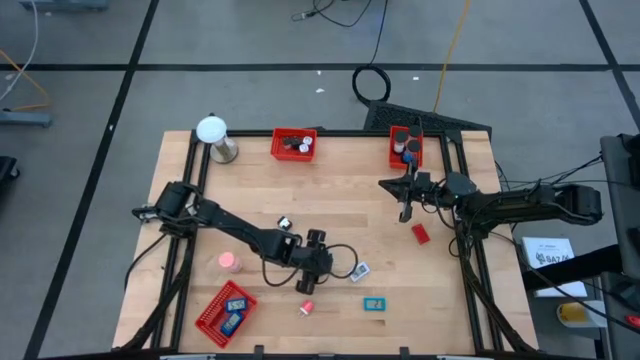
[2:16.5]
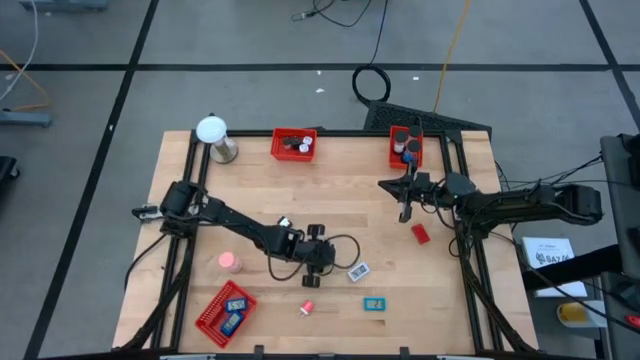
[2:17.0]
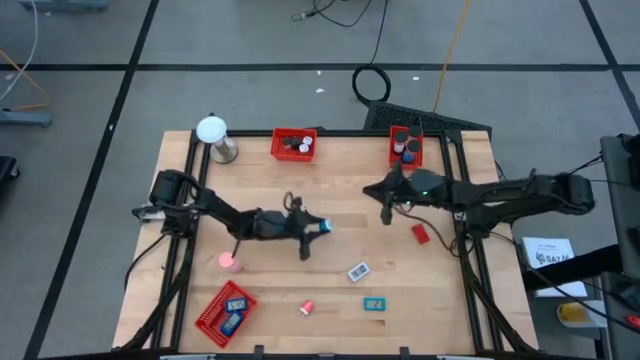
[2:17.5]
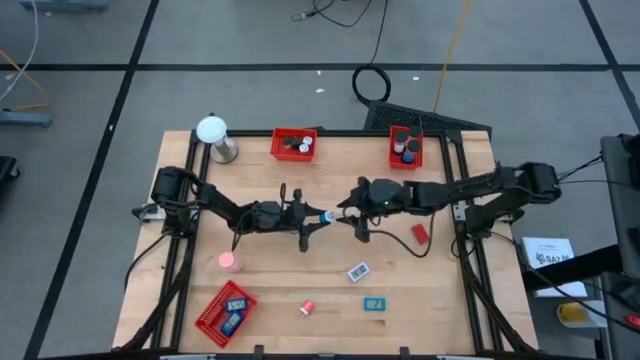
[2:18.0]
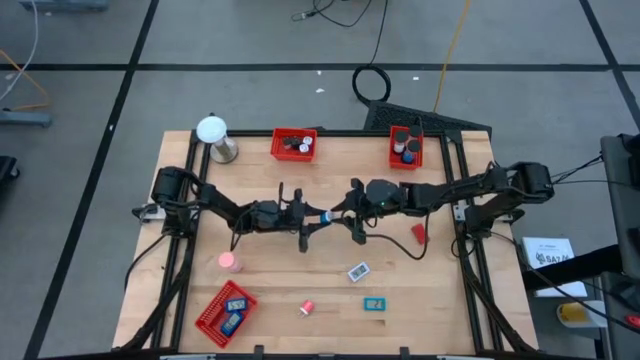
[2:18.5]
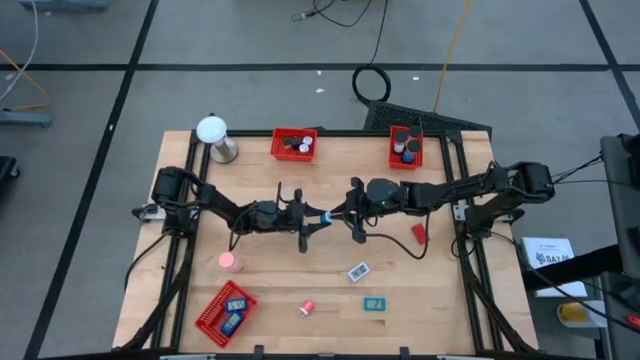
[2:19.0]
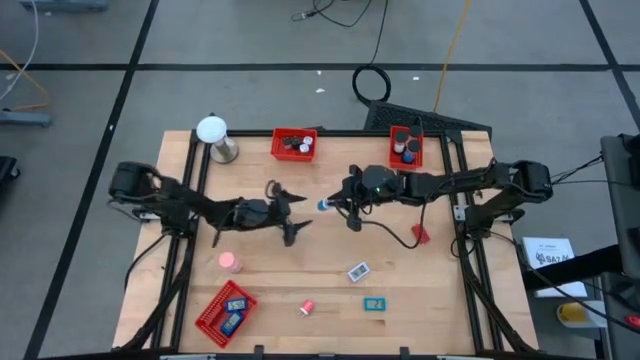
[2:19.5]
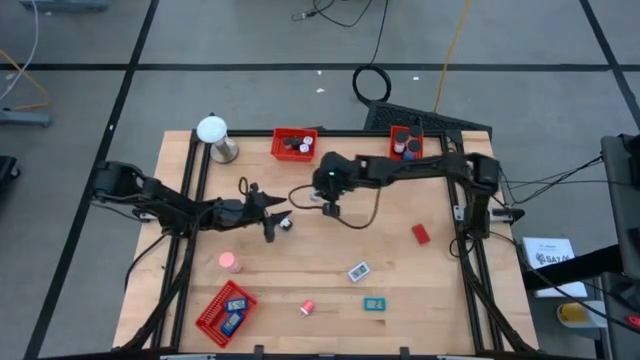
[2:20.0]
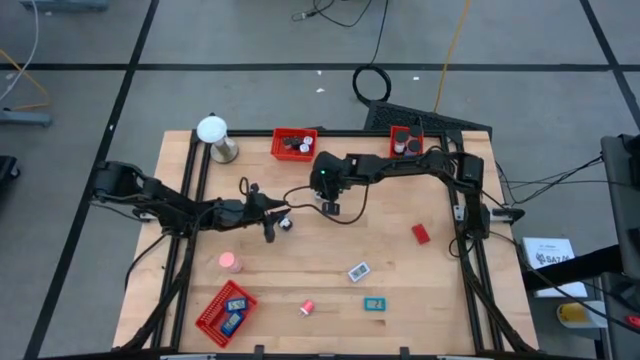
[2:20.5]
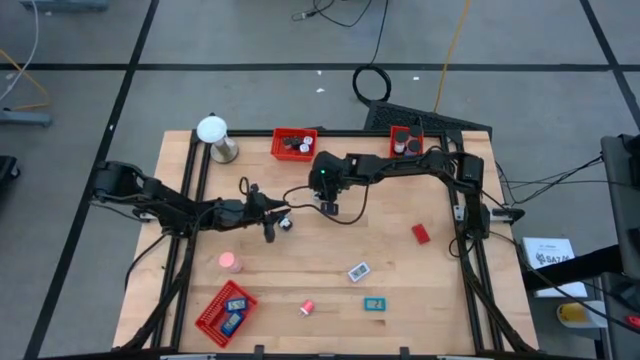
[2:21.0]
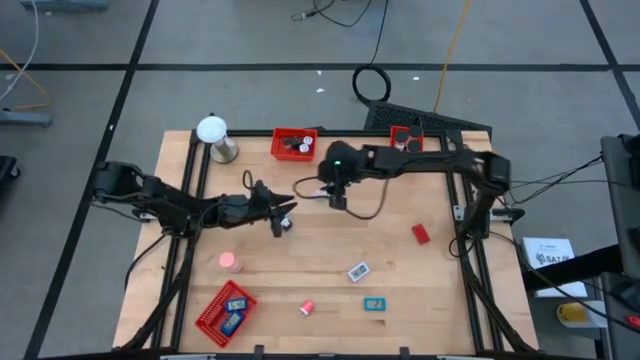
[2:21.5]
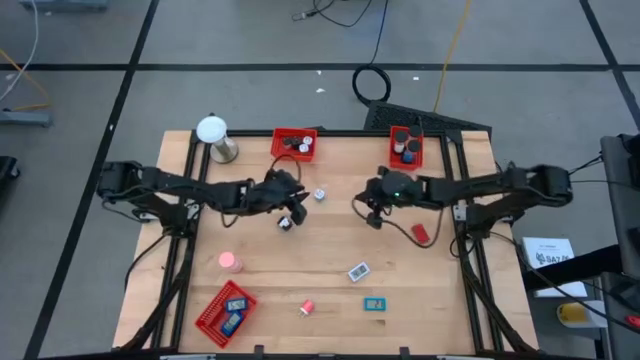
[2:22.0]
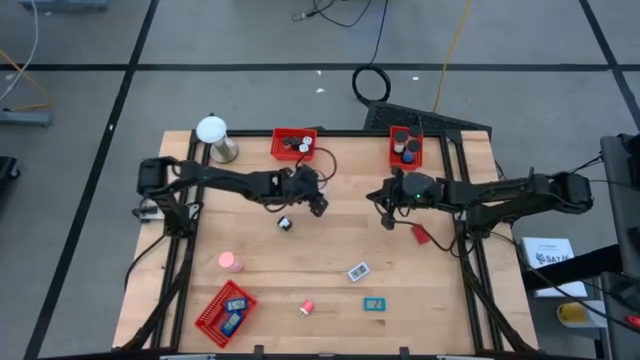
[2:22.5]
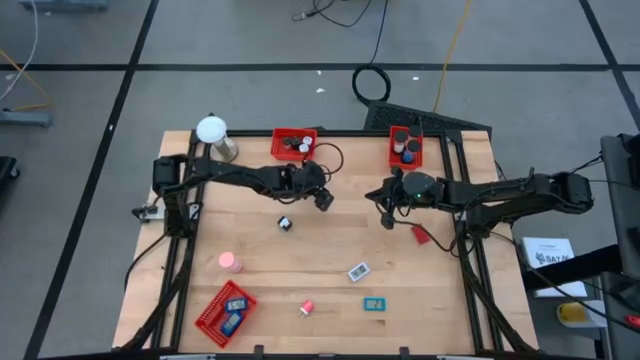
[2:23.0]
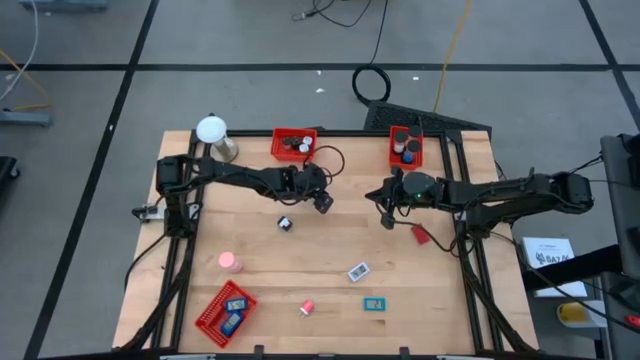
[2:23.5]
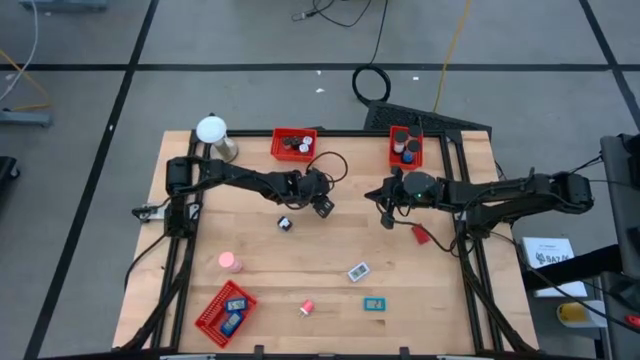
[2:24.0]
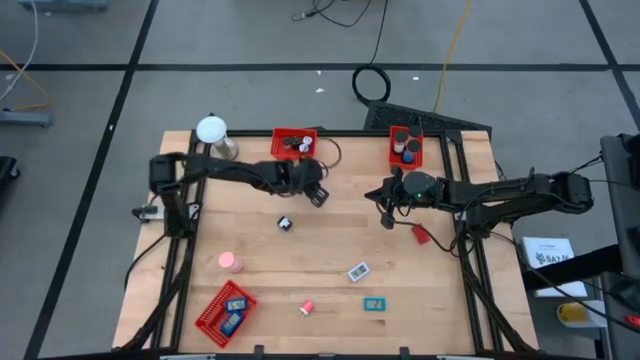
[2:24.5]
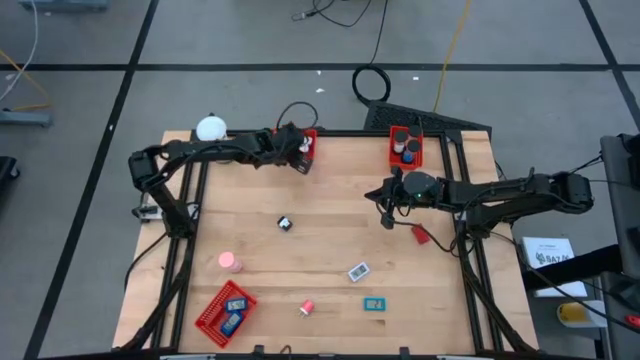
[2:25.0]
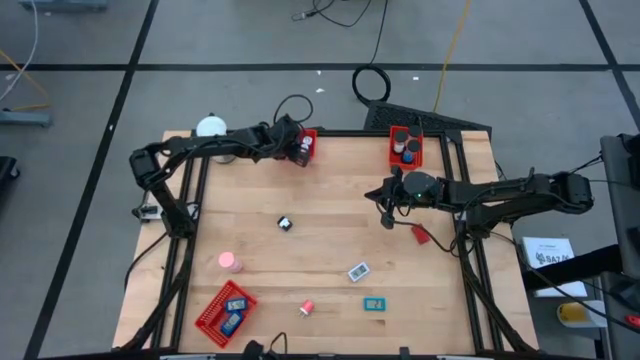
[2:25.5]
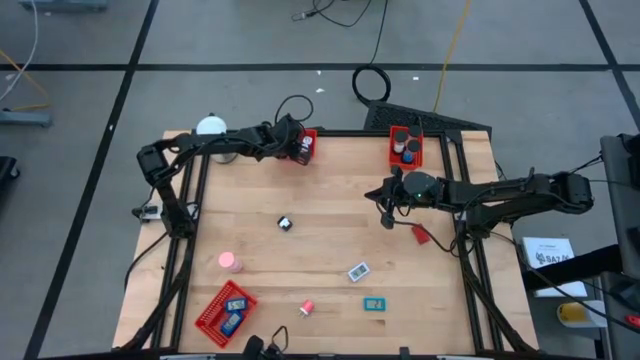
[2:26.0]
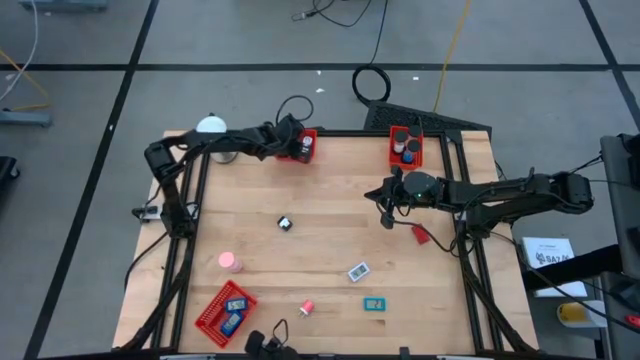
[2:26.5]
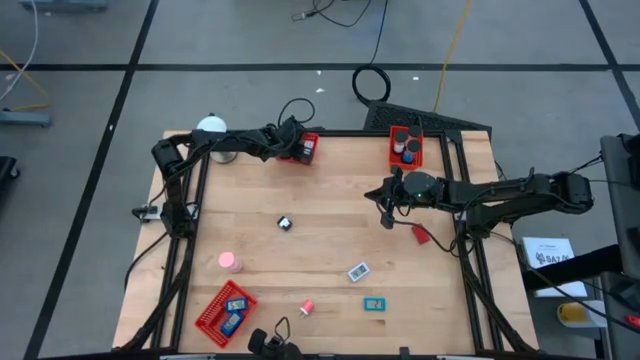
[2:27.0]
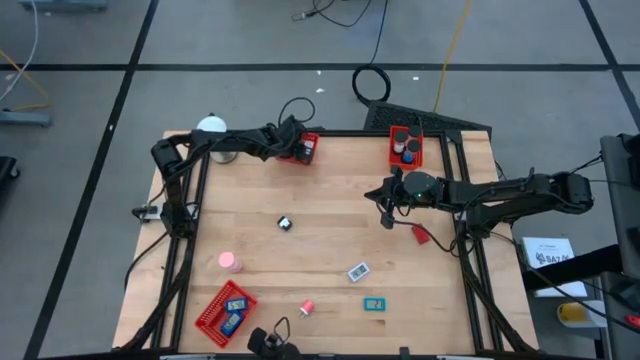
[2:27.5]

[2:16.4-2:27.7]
Task: Pick & Place Office items
Put the blue charger adapter into the top left red basket

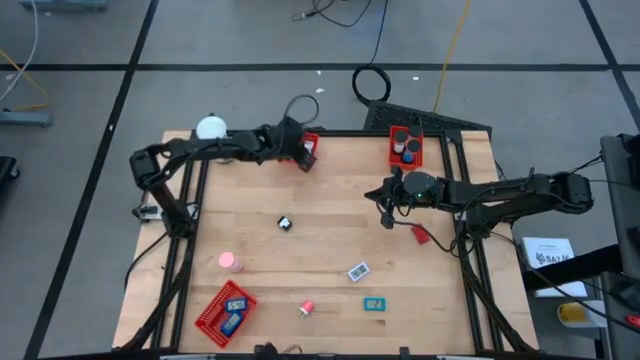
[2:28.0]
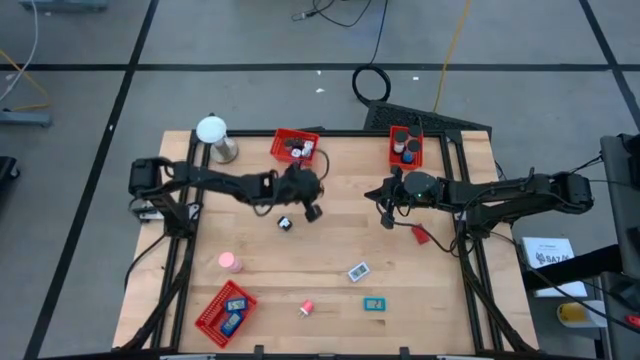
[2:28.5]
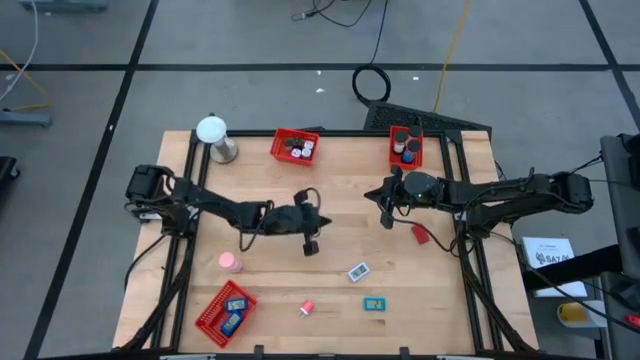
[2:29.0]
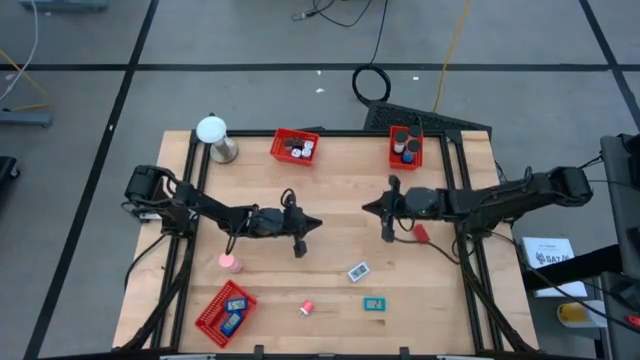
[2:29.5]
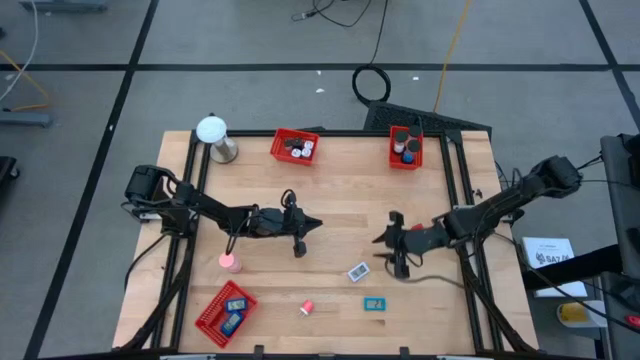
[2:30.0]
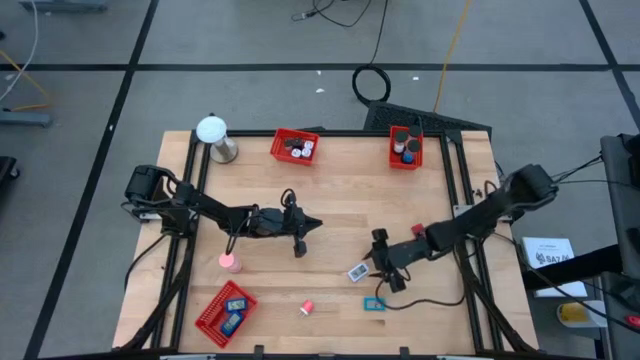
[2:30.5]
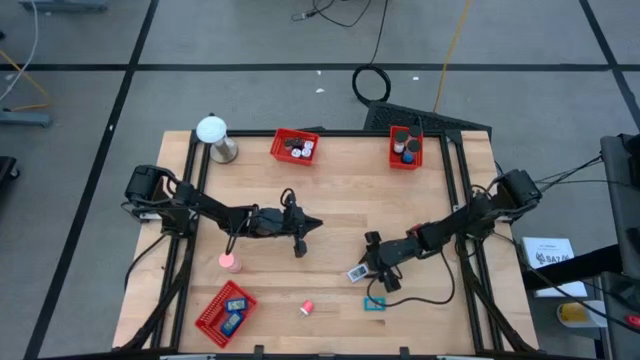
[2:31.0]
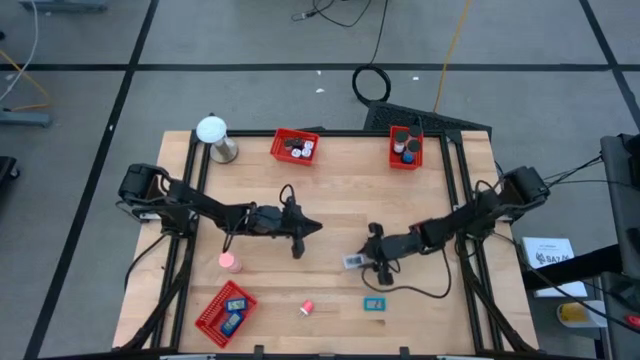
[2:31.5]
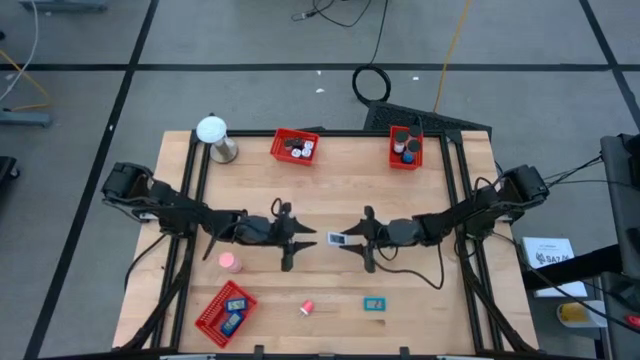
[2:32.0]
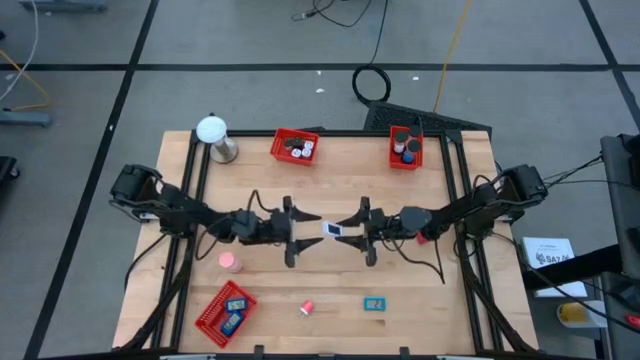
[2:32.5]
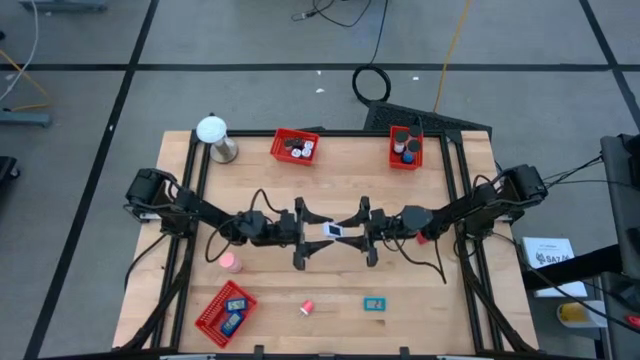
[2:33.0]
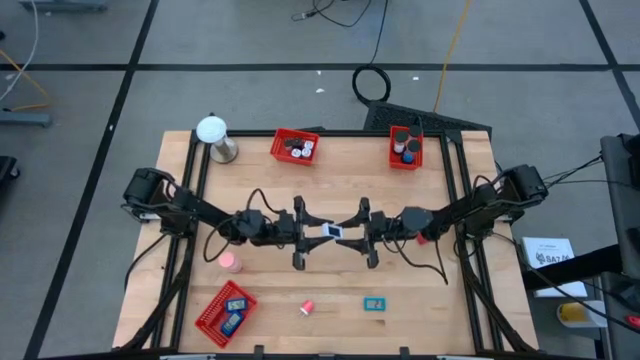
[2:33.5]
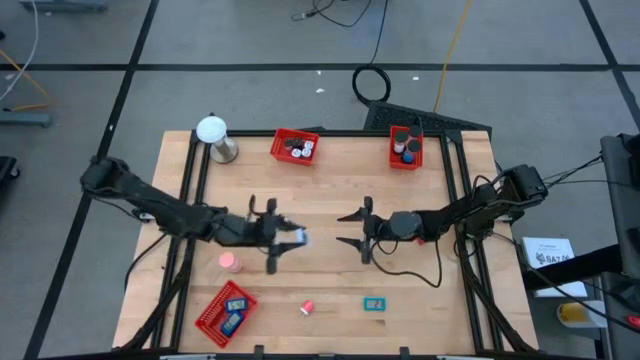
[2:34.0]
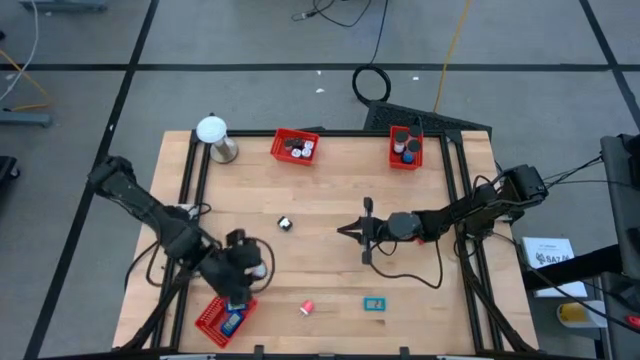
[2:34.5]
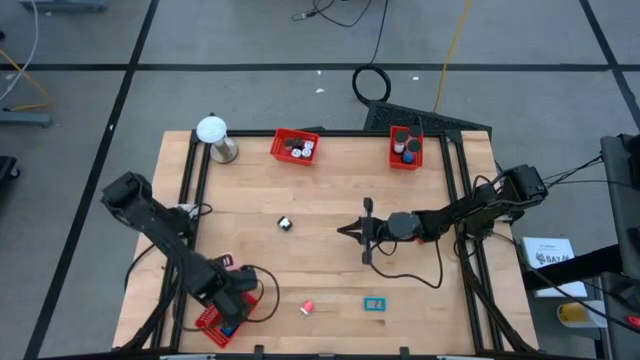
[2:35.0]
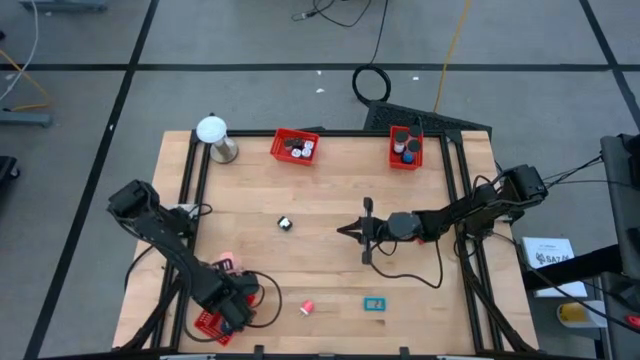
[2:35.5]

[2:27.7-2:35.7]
Put the white timer into the bottom red basket

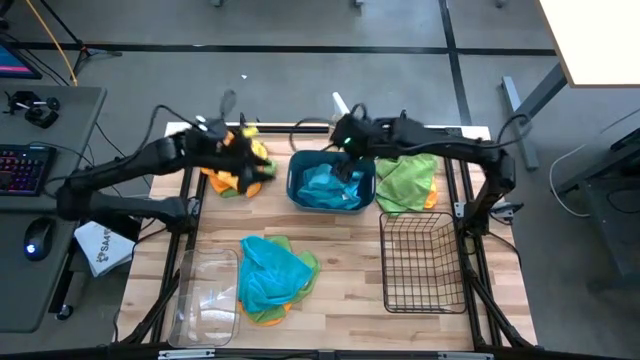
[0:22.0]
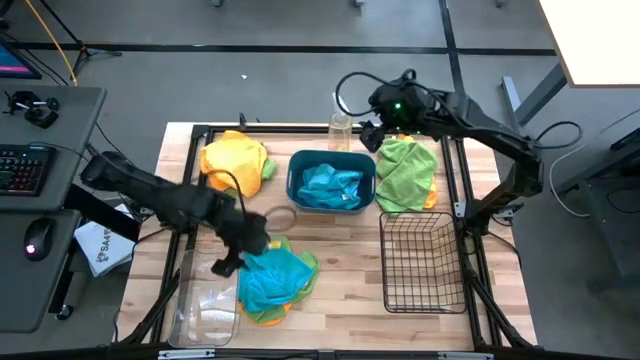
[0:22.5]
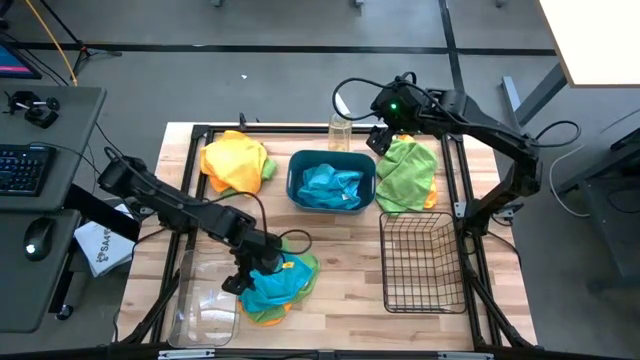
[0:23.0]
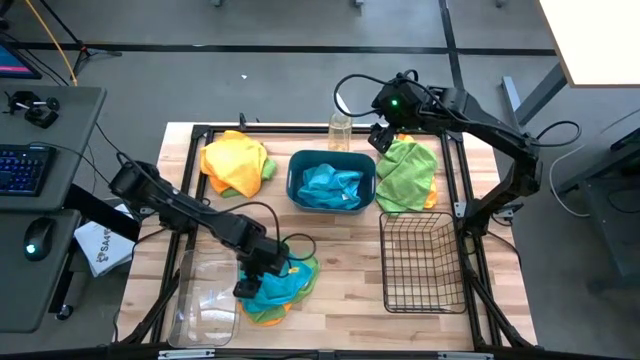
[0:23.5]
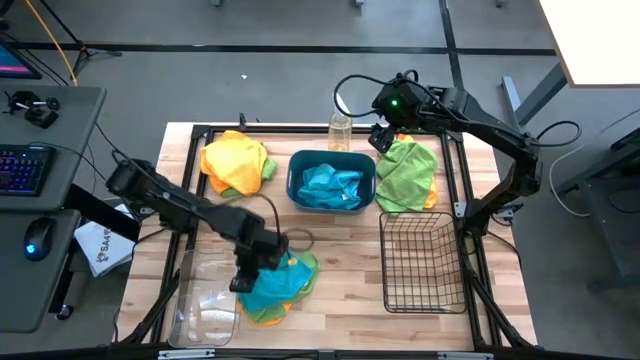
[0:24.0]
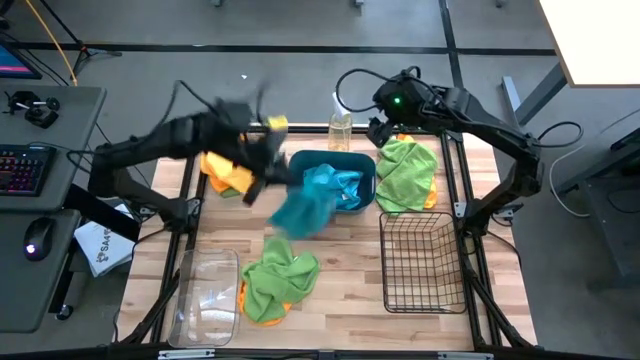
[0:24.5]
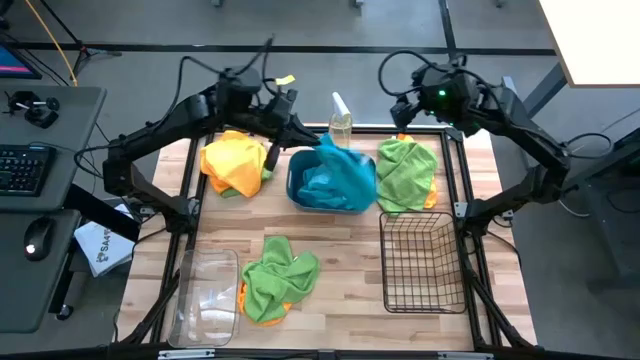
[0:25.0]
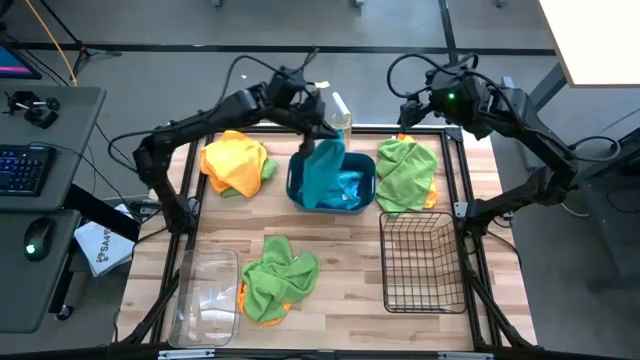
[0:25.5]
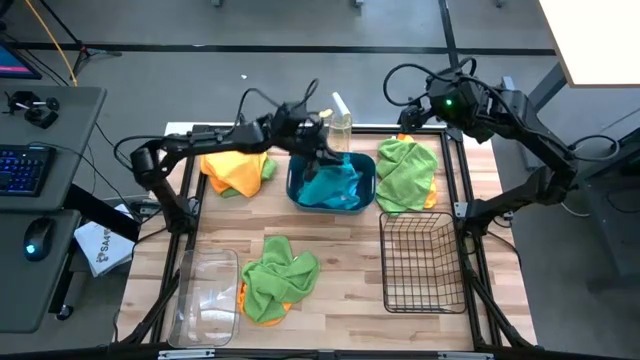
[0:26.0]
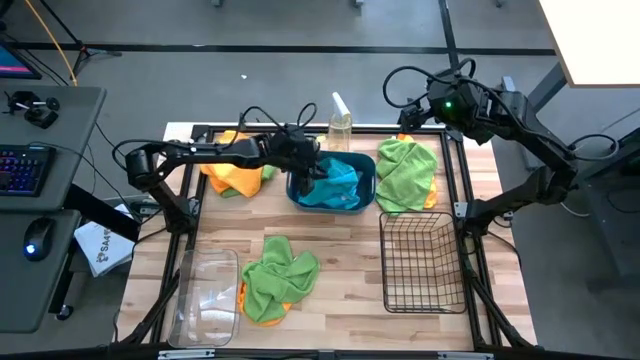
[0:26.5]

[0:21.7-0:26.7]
Task: Sort microfiber towel by color & place in baskets
Put the blue towel into the blue bin
